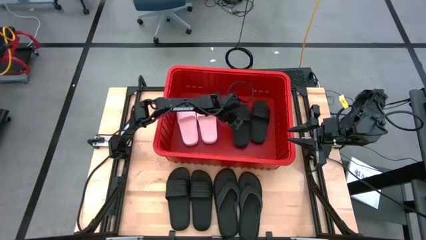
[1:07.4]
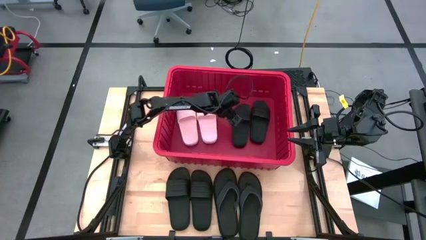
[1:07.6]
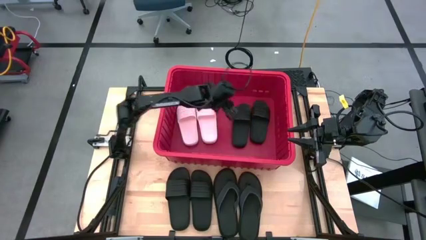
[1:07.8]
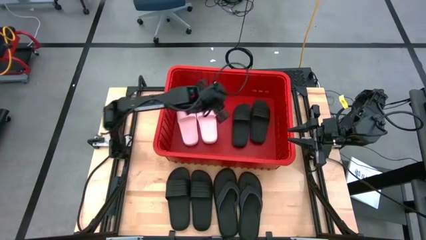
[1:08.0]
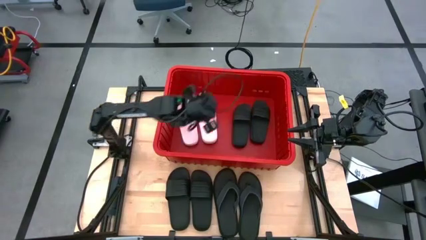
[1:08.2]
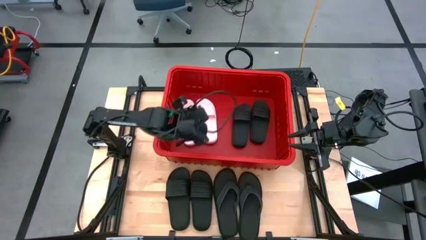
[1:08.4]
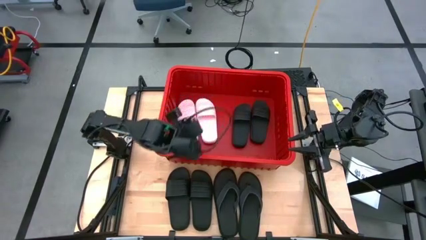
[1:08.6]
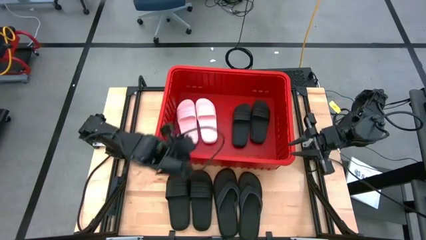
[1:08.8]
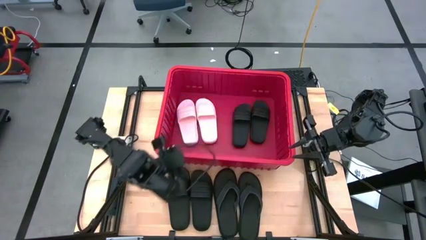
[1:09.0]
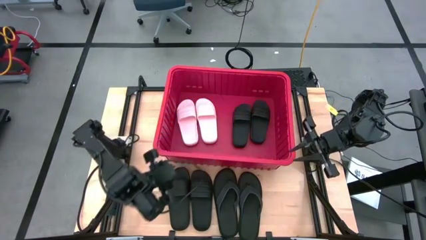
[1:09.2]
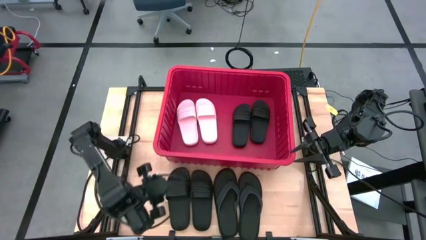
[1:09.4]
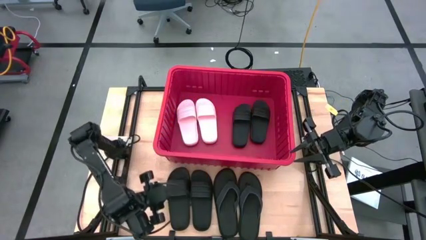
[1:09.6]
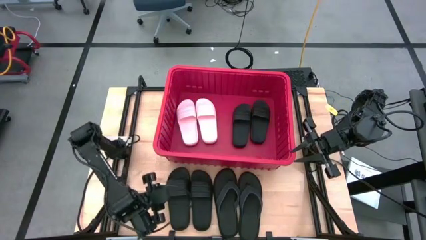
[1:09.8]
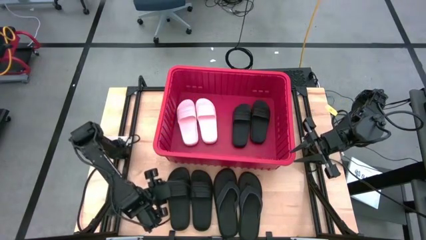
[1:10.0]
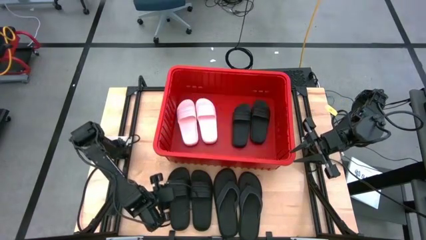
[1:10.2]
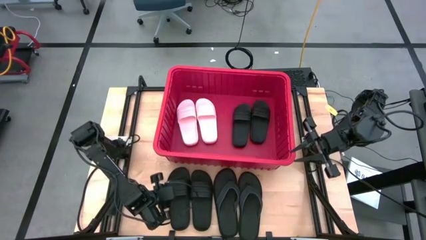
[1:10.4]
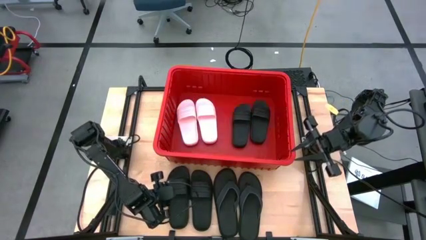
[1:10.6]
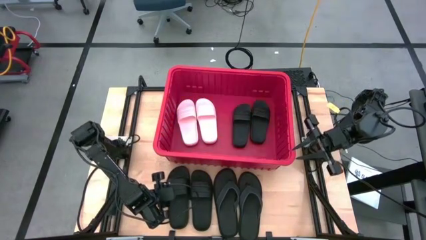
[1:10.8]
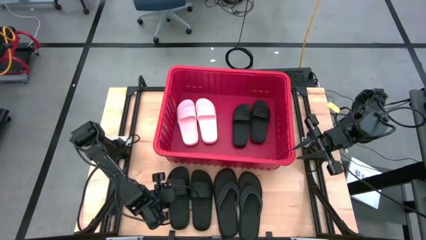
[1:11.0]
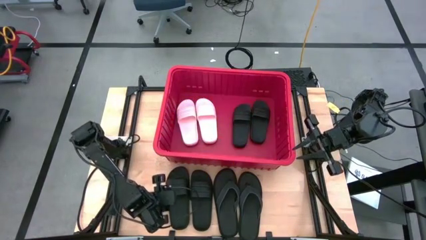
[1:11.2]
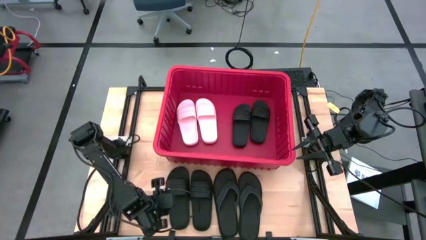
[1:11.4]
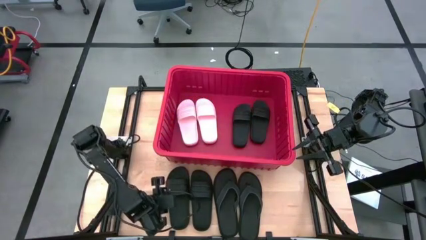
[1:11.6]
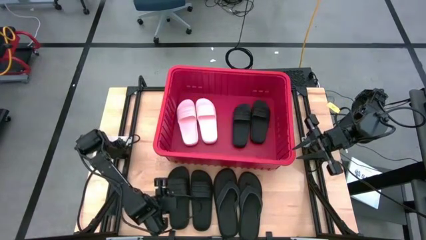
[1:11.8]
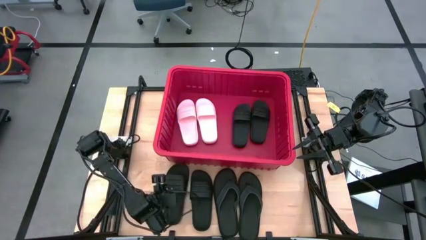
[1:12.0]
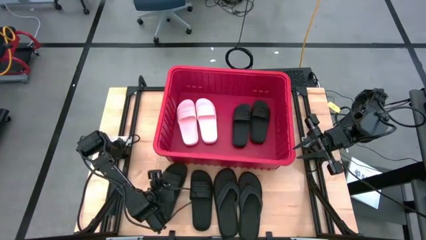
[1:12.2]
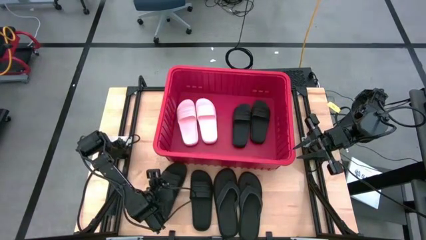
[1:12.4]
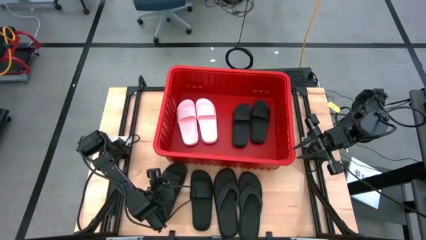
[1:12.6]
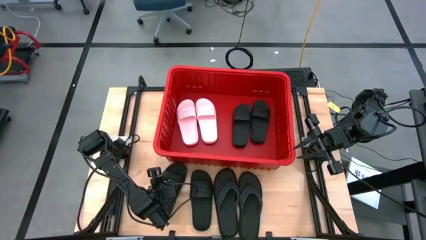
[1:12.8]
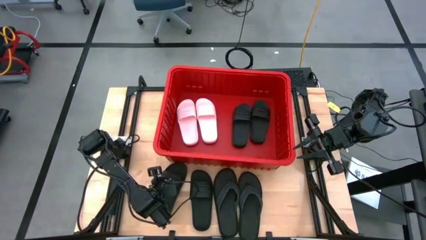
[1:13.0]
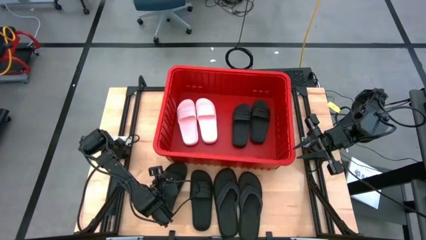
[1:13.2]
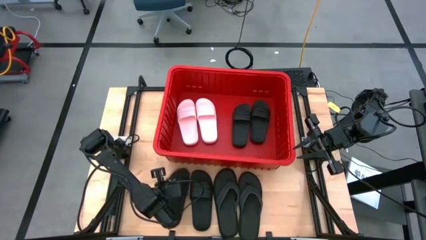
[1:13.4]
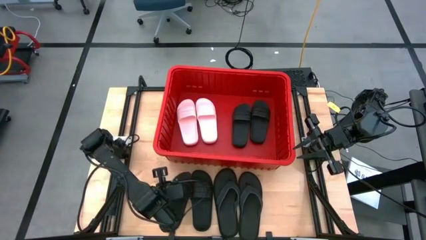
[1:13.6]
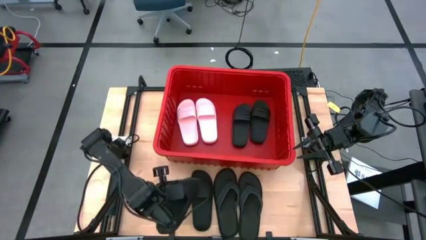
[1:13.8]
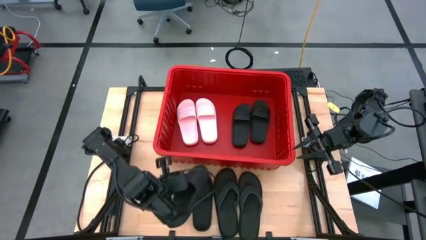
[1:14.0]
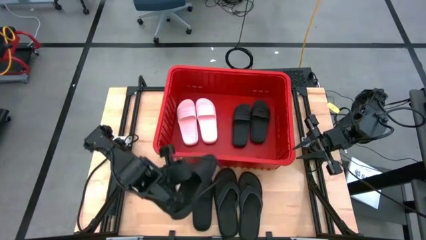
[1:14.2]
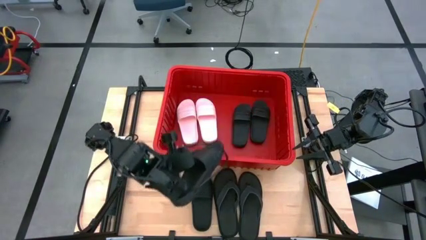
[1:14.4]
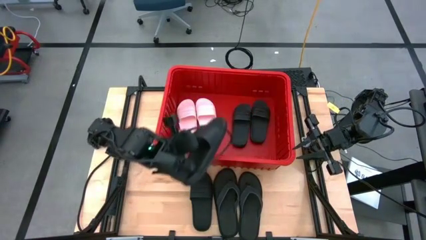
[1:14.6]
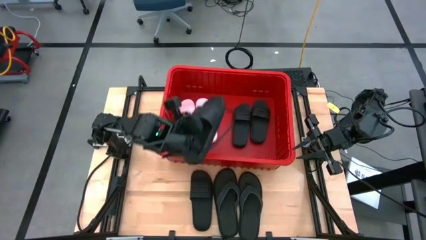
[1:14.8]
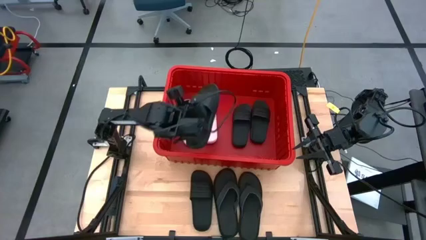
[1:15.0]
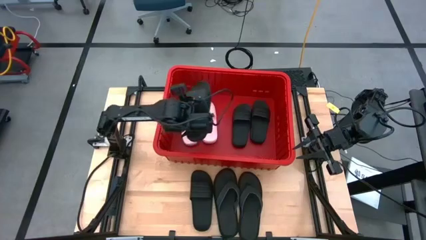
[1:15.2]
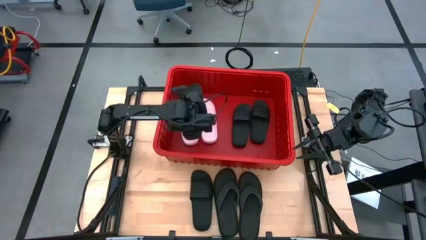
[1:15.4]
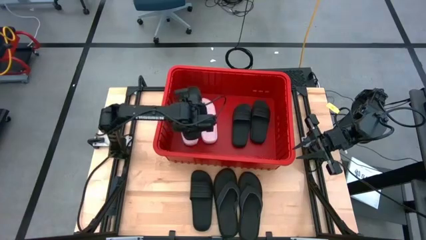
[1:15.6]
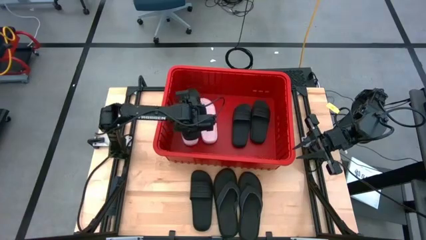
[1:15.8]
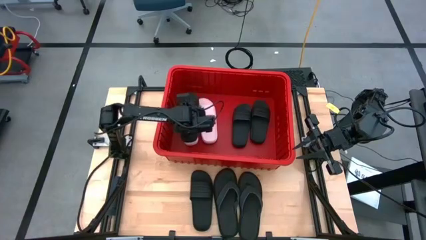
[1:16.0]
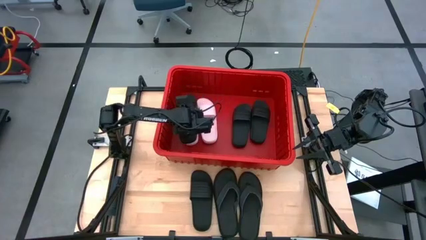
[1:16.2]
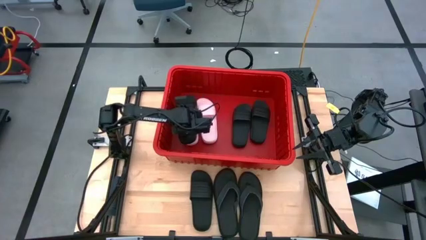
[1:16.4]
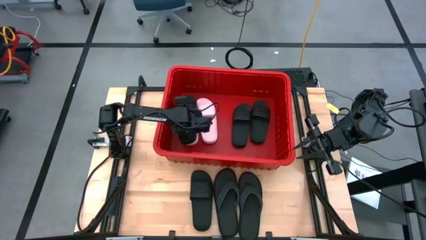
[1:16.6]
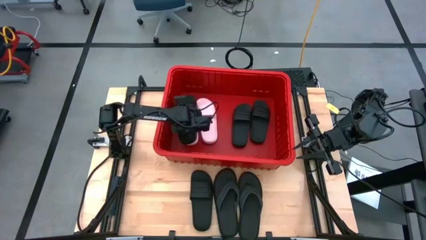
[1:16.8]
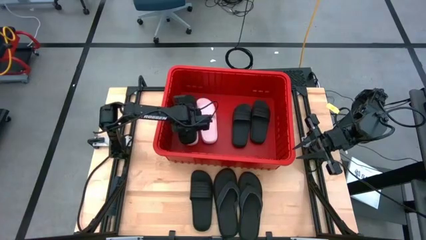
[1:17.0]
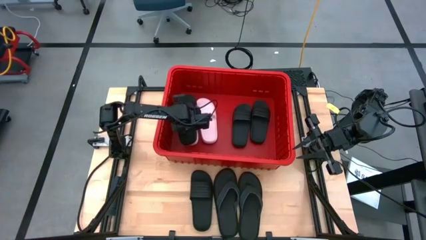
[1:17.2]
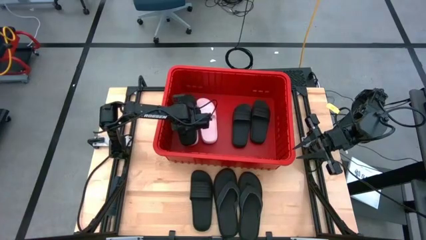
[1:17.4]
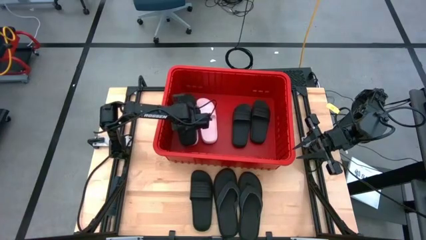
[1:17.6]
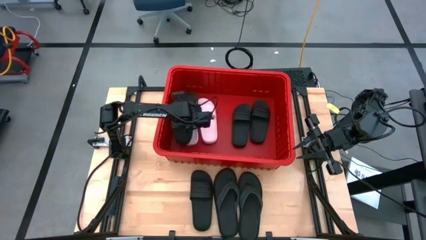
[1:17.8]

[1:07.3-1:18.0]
Task: Pick and place slides into bin
Put the left black slide into the bin

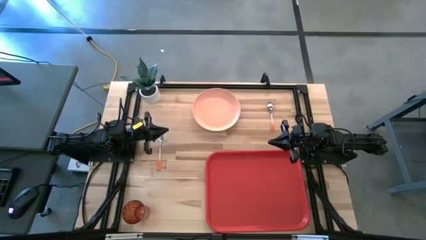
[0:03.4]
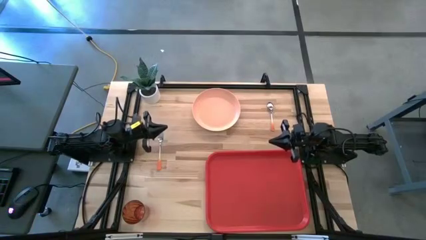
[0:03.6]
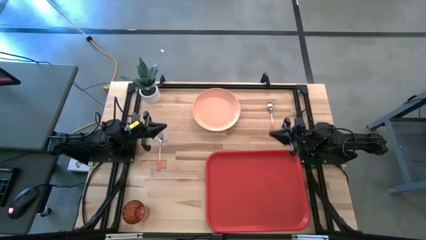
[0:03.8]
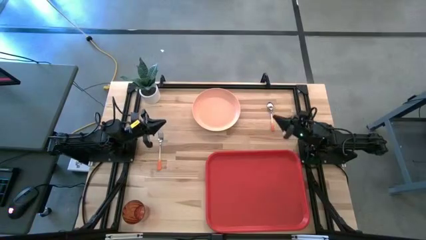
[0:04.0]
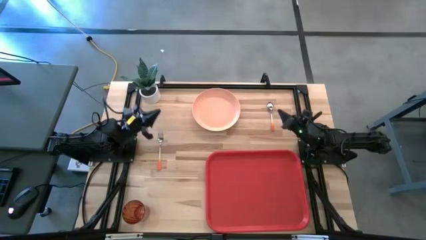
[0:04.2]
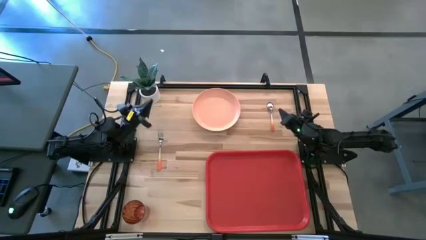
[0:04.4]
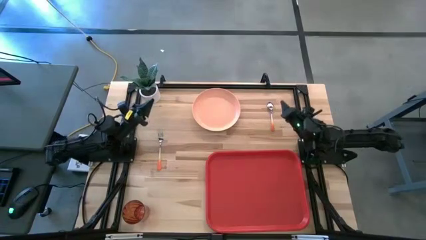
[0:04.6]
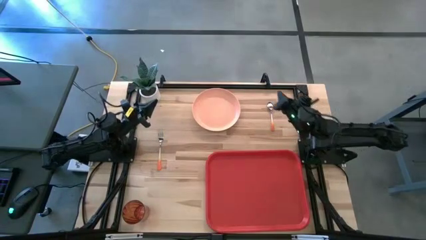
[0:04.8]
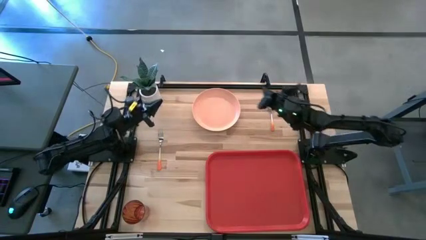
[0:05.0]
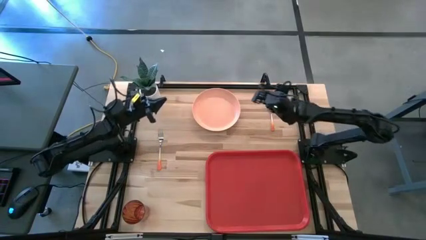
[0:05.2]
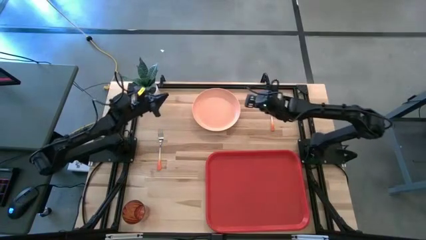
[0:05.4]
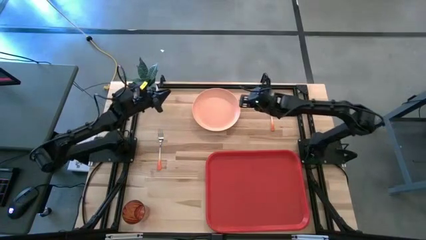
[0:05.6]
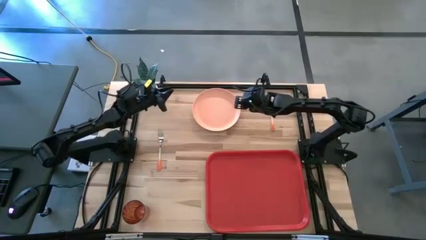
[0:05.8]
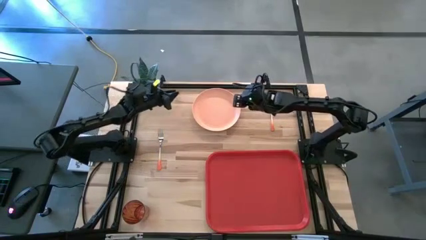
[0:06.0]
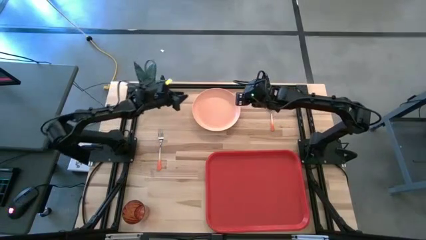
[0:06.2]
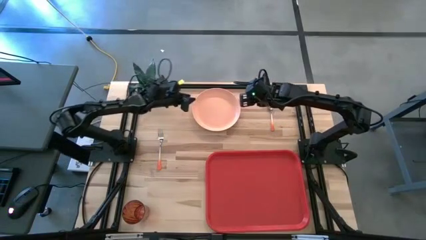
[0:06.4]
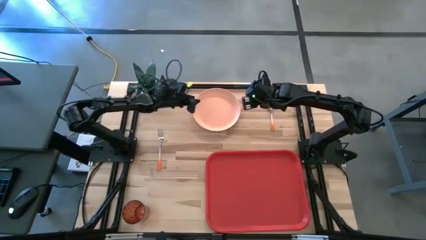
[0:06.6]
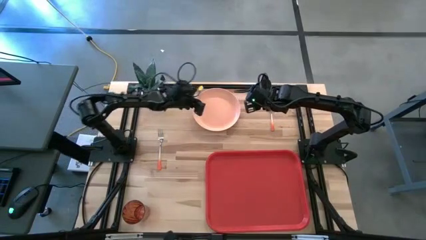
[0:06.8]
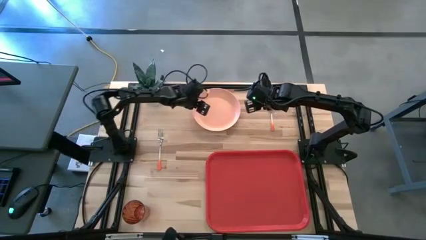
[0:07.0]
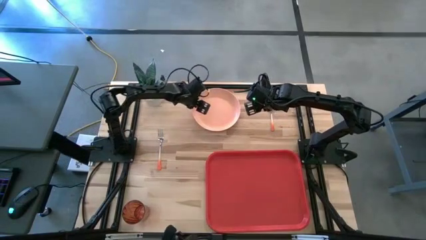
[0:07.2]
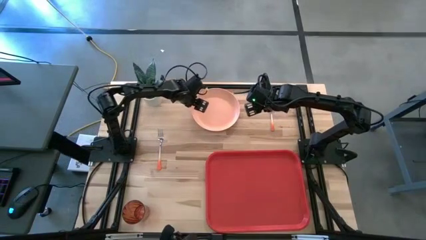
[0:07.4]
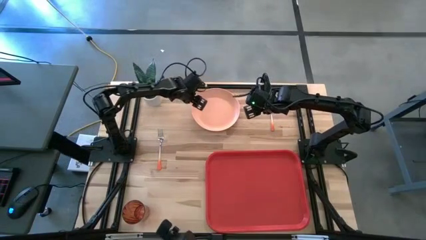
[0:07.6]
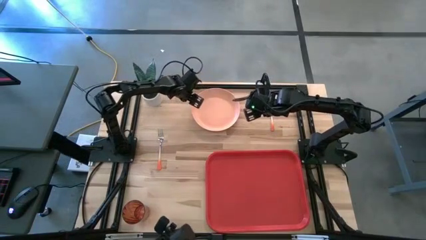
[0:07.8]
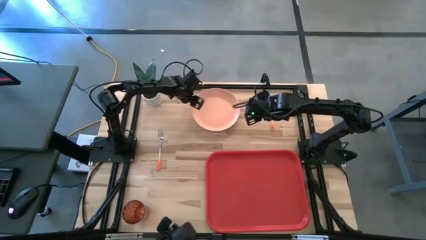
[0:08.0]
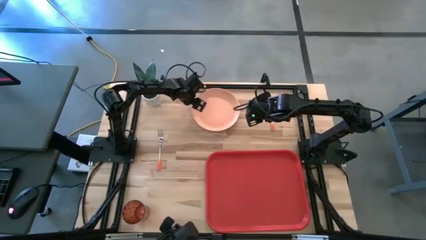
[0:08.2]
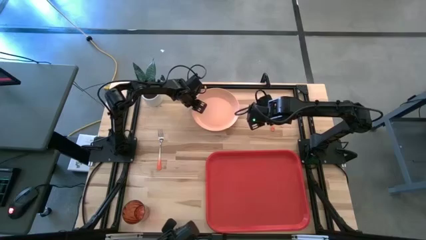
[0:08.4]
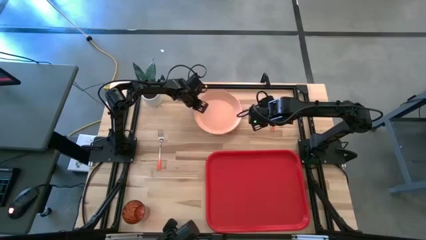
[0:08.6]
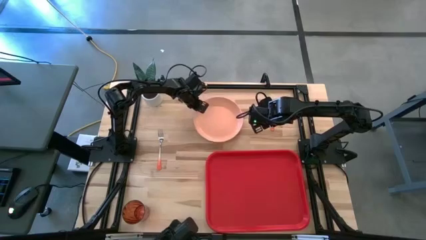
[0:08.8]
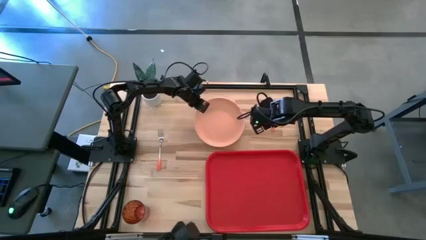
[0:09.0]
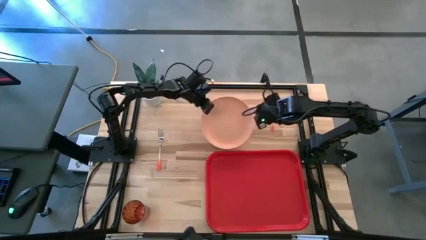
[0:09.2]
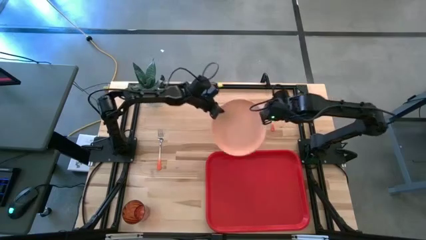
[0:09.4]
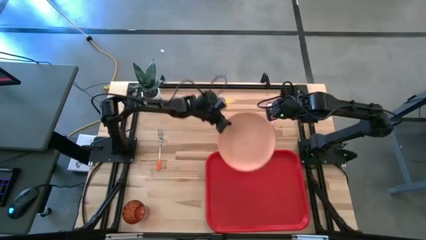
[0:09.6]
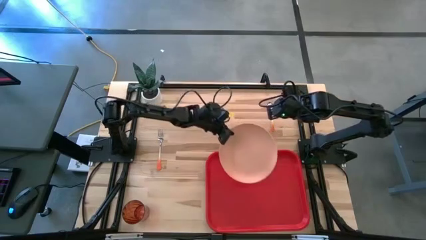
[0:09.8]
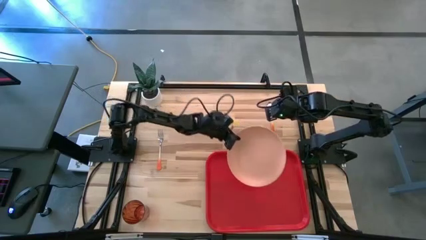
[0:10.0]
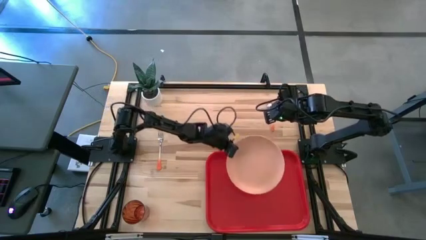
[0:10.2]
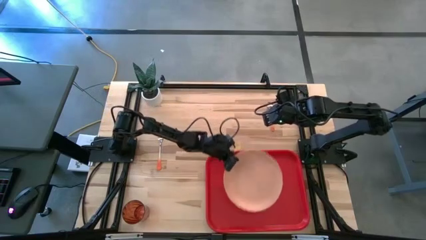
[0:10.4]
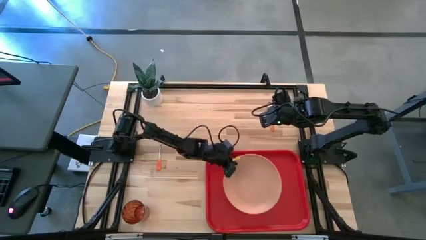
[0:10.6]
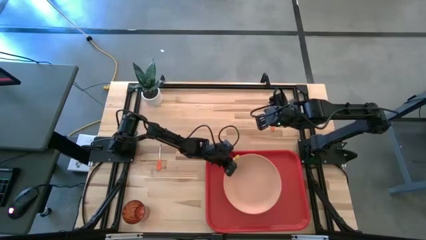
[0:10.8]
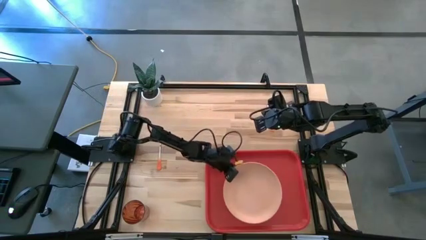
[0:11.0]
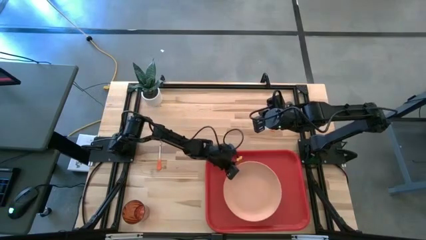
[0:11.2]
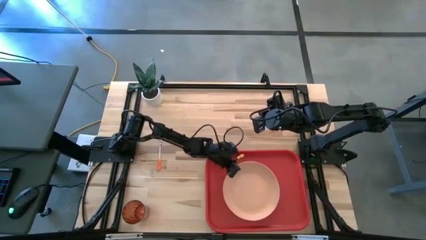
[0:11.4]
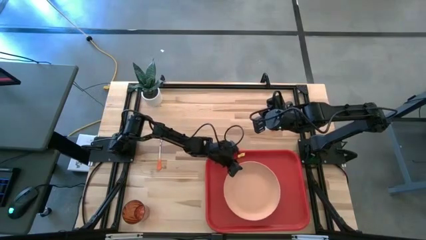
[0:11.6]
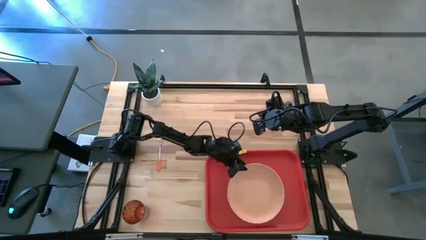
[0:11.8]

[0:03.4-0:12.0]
Task: Pick and place plate/cup/fork/spoon on tray
Put the light orange plate on the red tray
